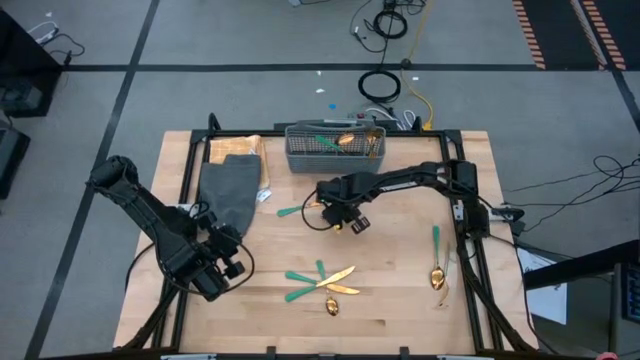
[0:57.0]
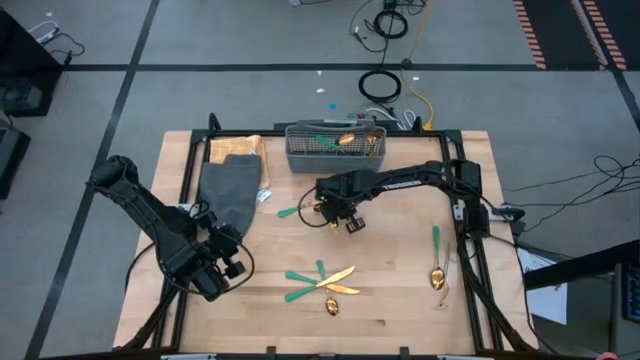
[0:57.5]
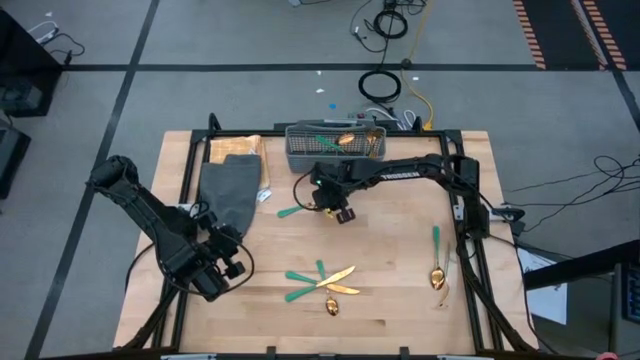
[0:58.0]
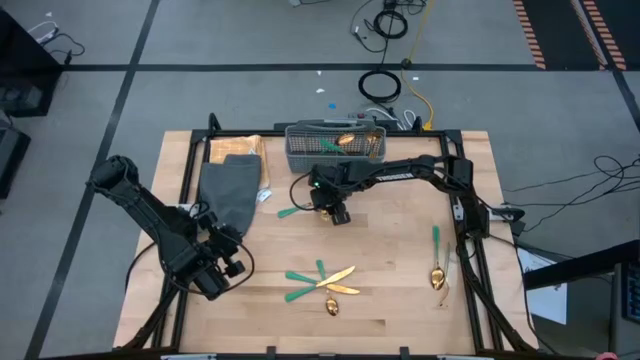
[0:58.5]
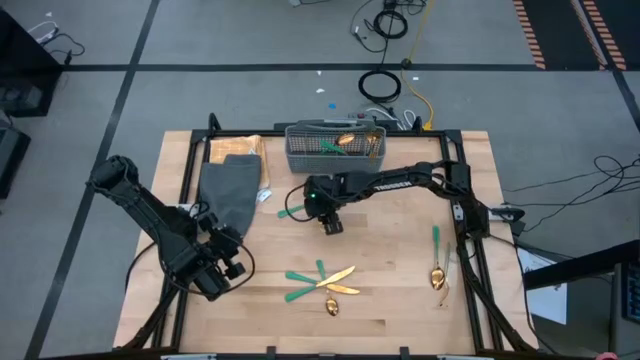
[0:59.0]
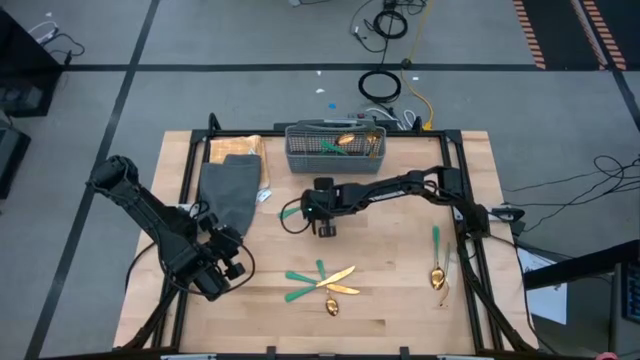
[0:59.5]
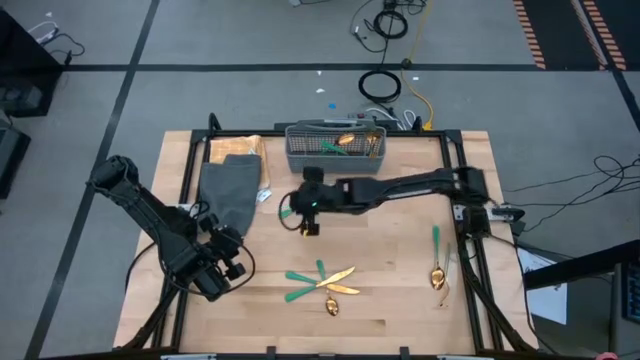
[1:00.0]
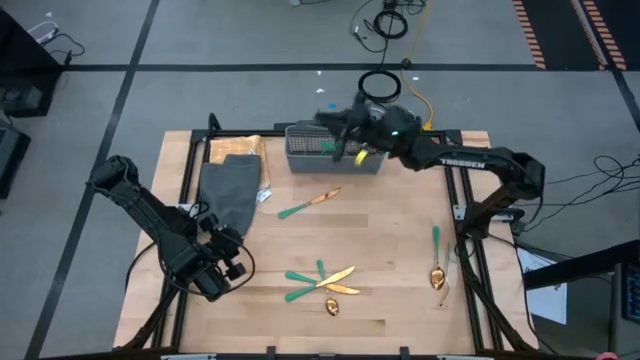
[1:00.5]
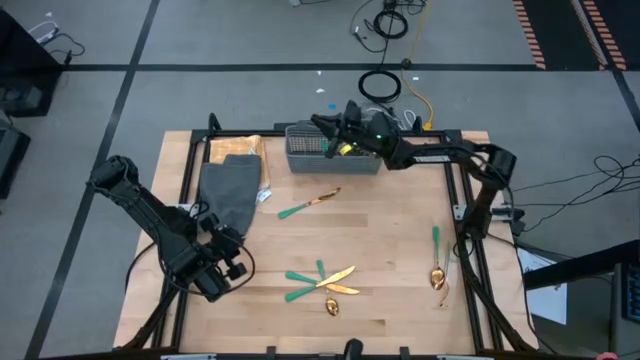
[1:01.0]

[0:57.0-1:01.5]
Task: Sort silverware
Put the green spoon into the gray silverware basket

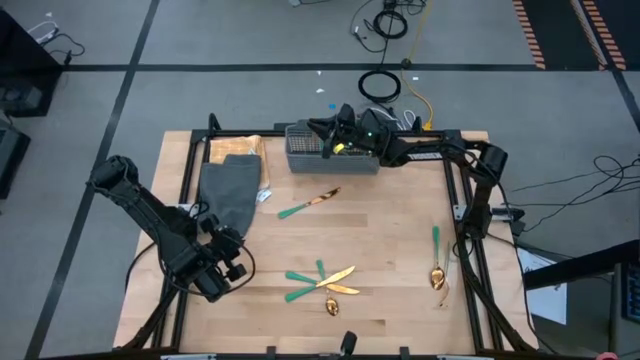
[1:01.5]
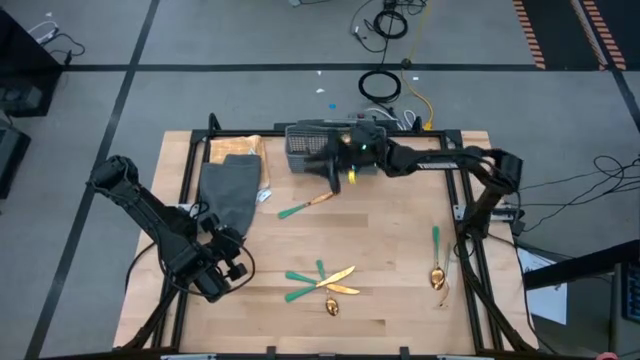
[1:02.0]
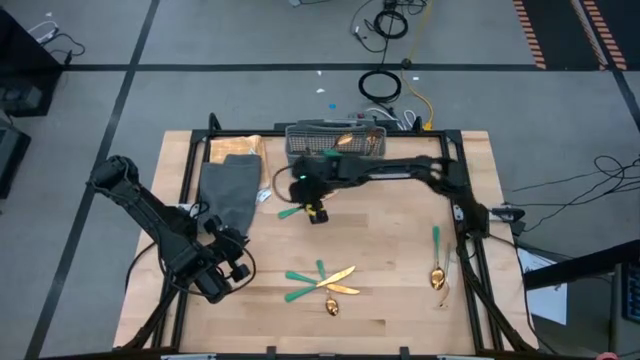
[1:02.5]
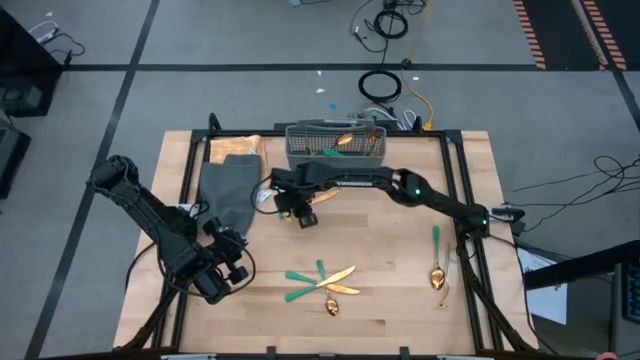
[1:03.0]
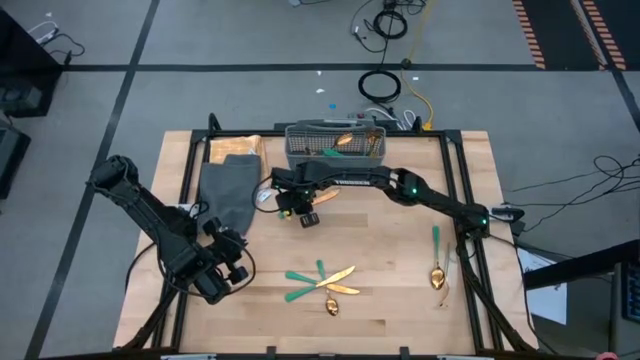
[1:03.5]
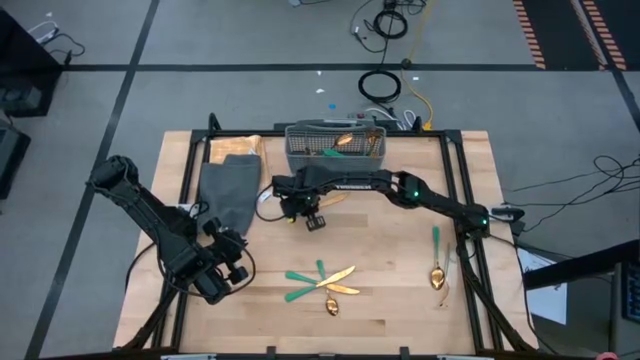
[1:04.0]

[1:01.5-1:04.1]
Put the green knife into the gray silverware basket

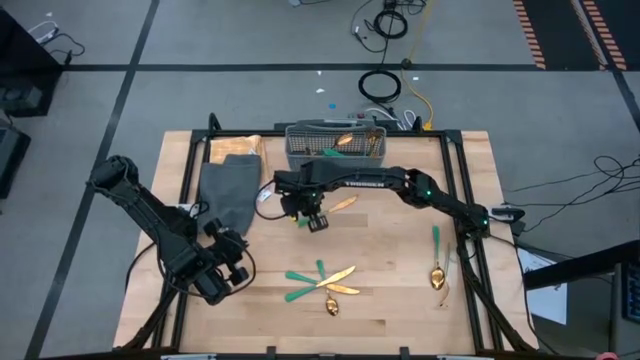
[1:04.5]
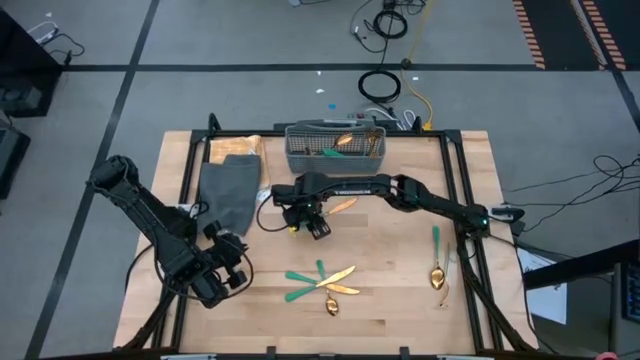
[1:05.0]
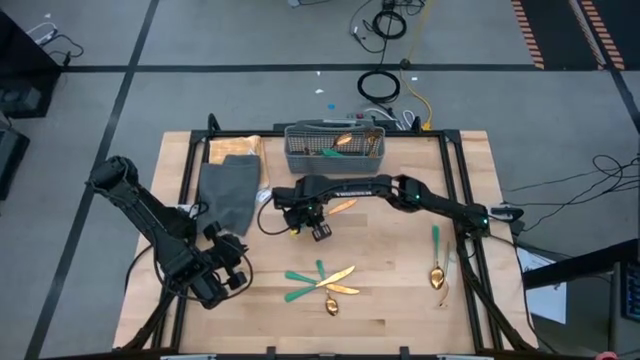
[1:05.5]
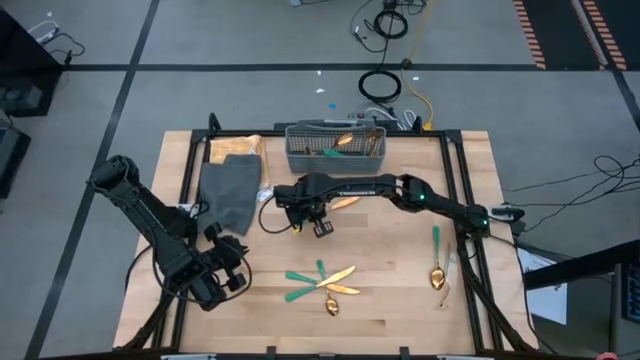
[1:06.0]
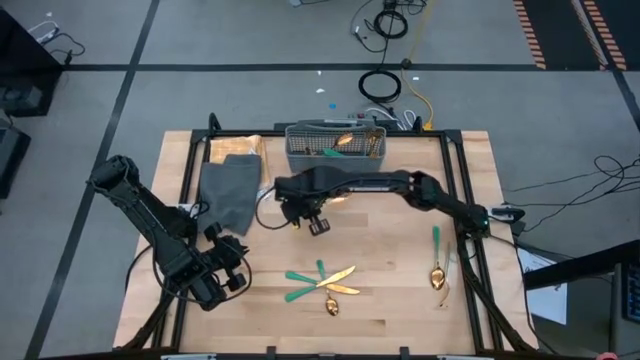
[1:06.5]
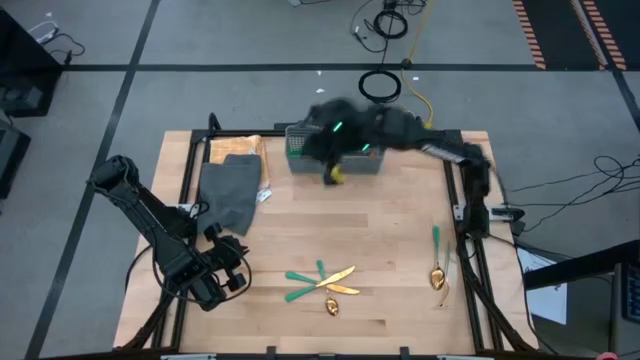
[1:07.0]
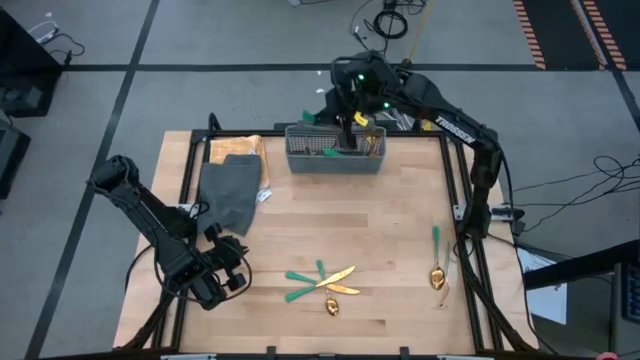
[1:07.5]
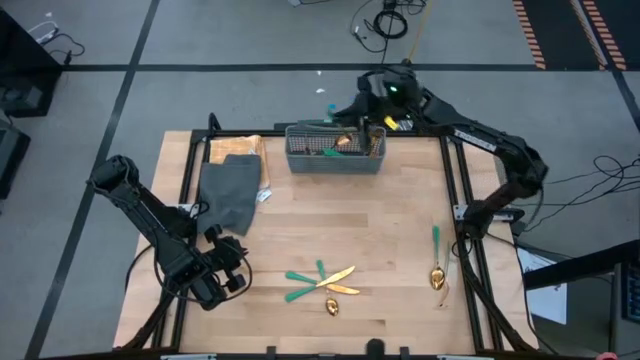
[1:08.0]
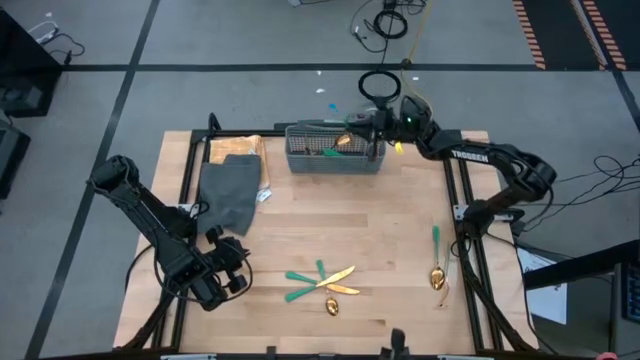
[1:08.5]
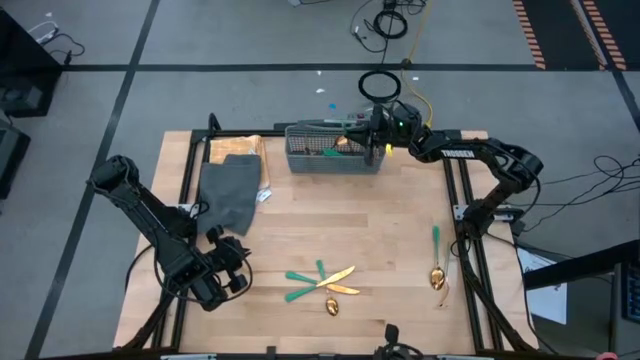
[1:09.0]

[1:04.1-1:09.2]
Put the green knife into the gray silverware basket

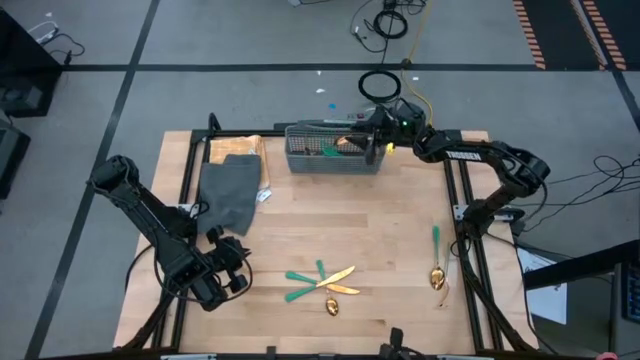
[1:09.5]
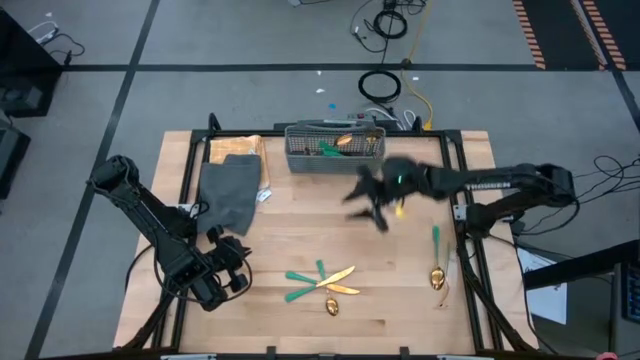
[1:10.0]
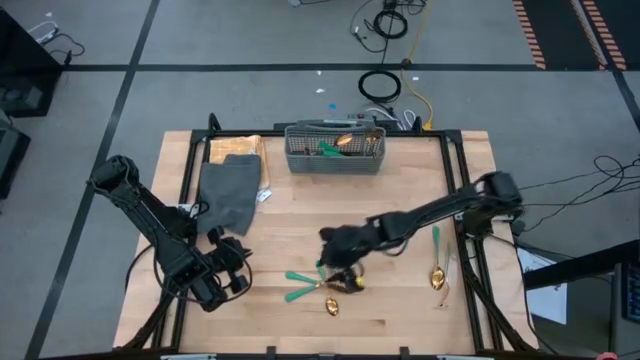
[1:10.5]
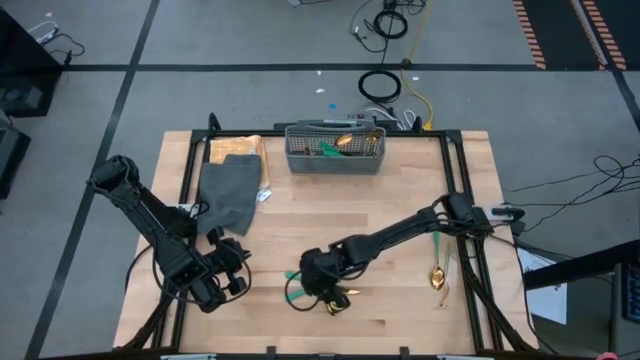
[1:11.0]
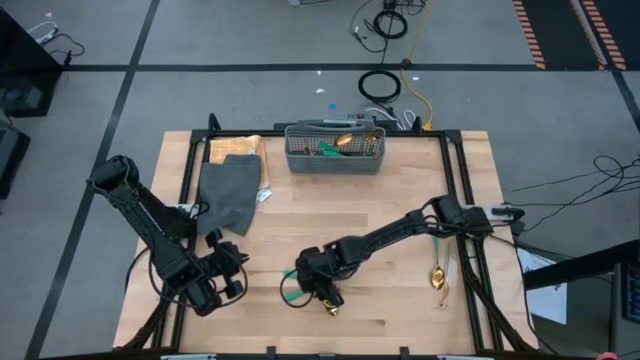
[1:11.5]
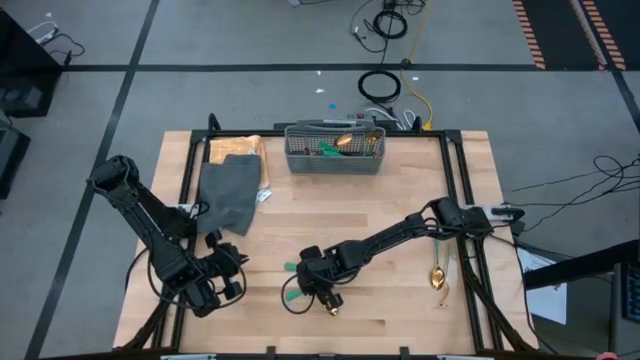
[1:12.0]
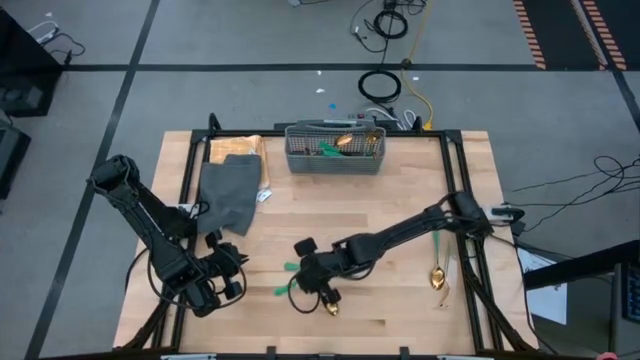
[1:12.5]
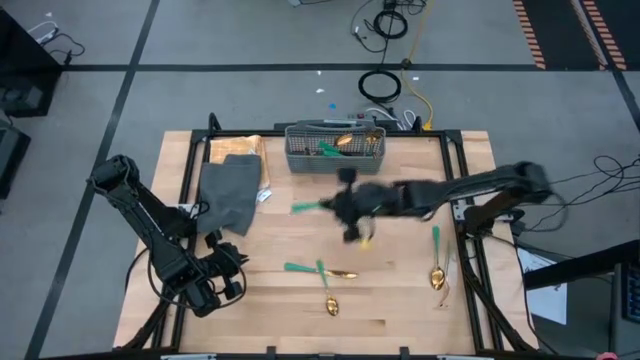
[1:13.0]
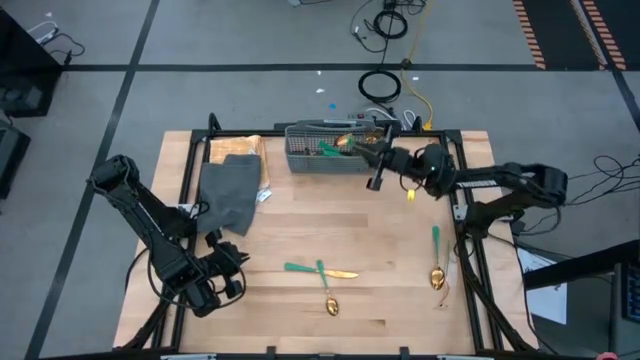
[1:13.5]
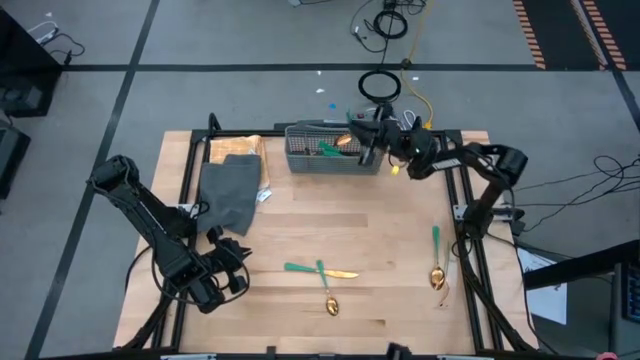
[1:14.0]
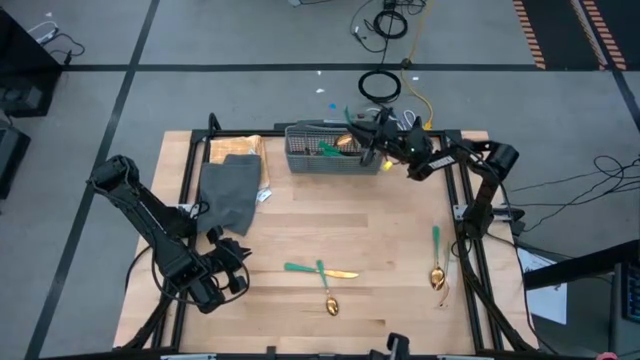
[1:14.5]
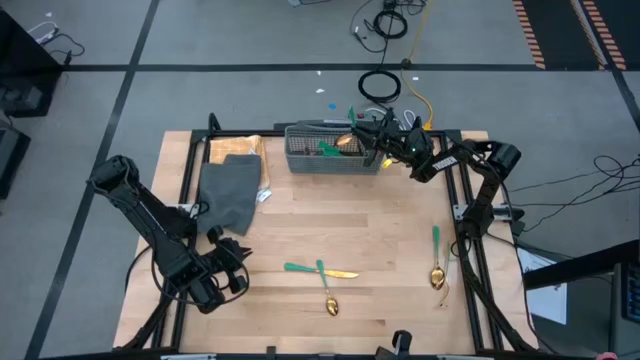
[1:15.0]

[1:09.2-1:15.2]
Put the green knife into the gray silverware basket

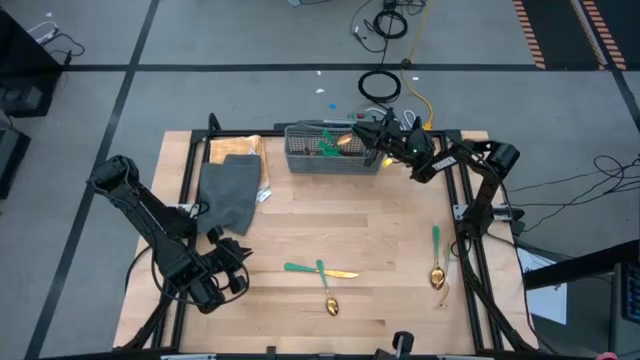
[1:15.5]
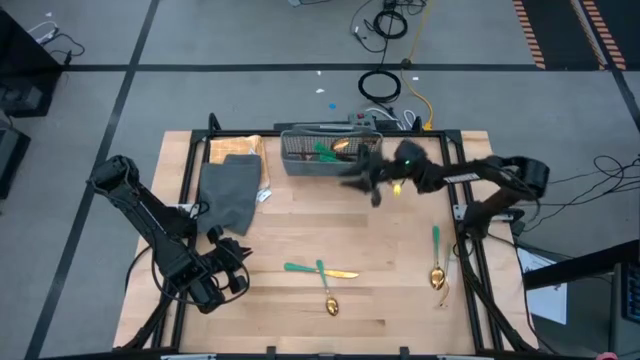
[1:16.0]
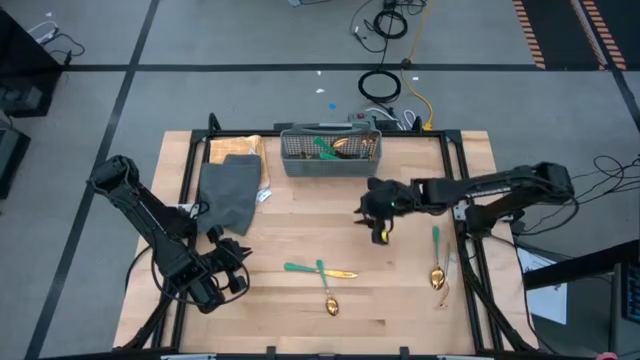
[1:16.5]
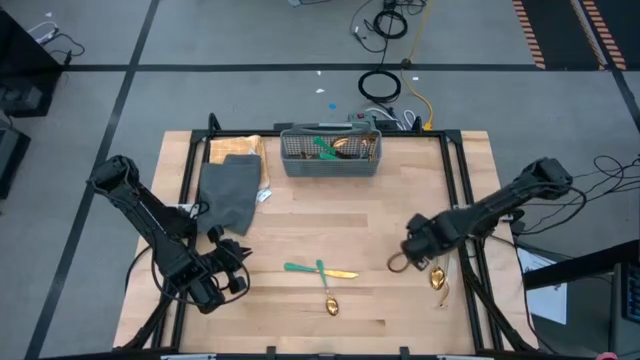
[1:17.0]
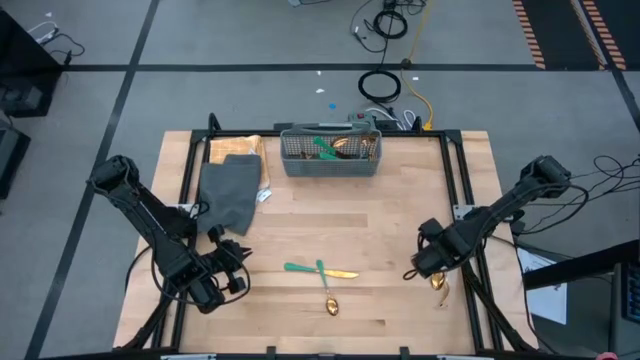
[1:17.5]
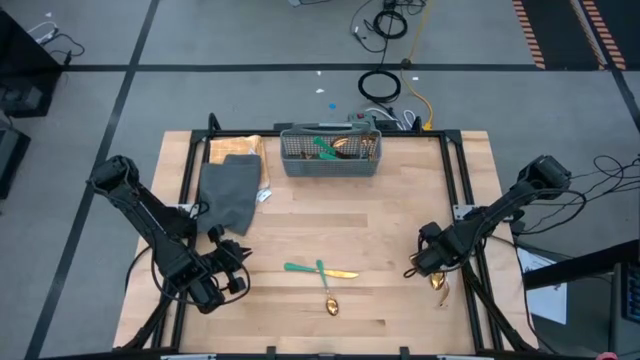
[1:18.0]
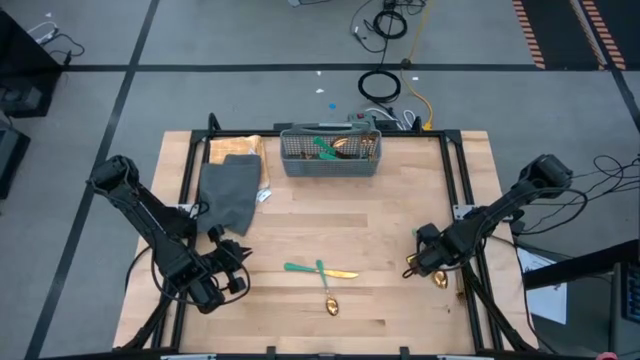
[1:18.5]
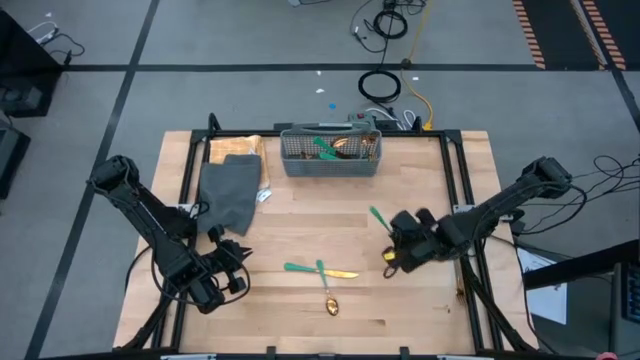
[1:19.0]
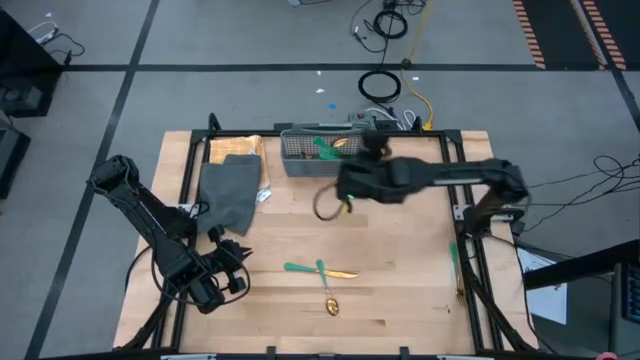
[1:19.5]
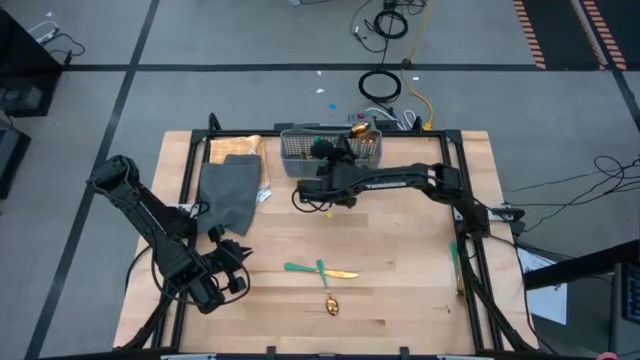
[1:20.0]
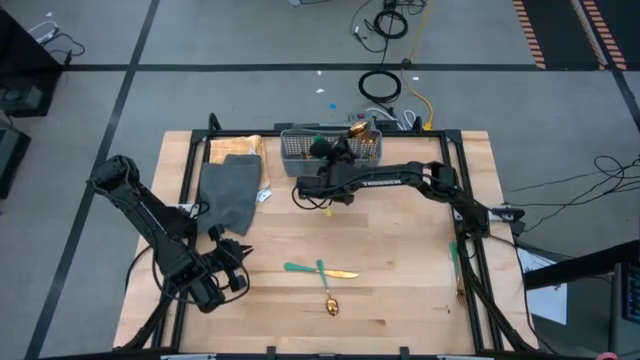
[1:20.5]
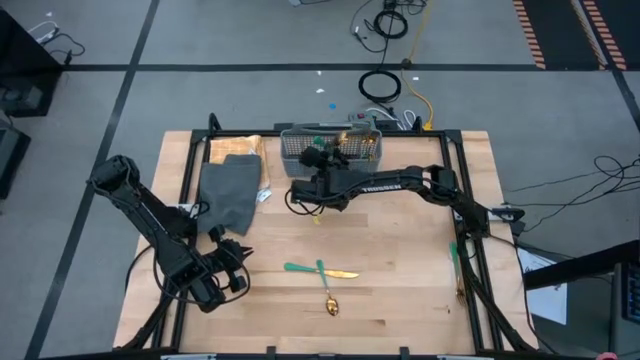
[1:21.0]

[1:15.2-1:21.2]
Put the green spoon into the gray silverware basket
